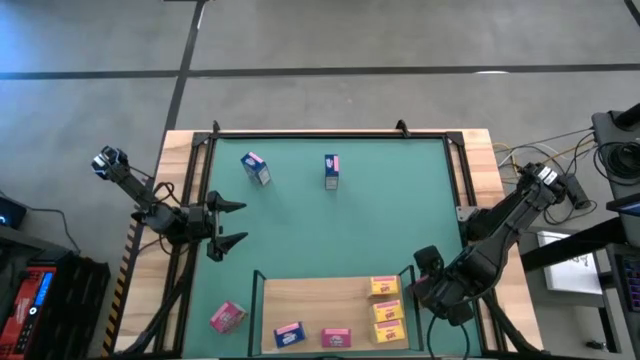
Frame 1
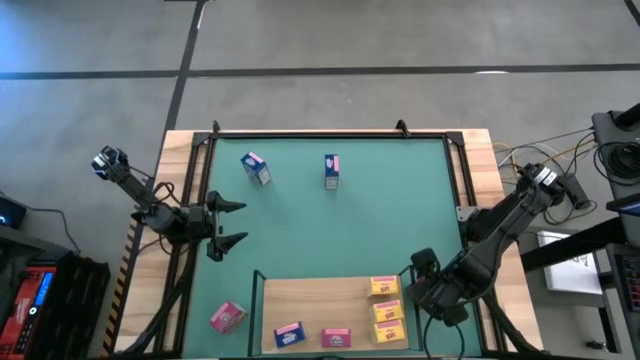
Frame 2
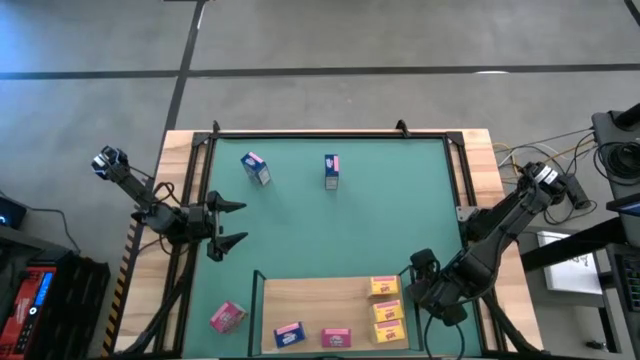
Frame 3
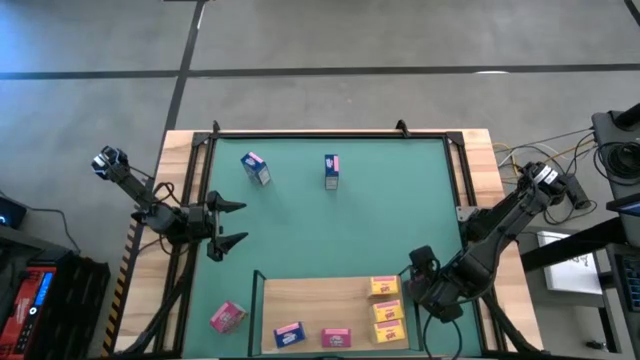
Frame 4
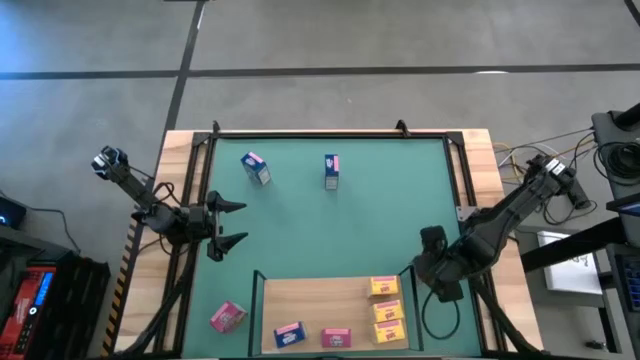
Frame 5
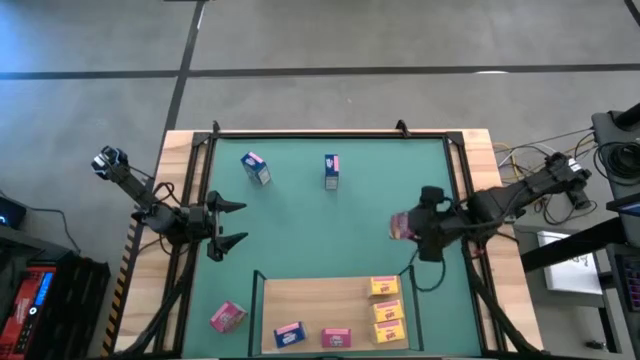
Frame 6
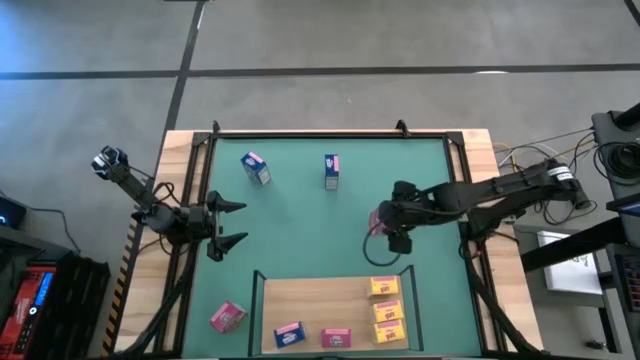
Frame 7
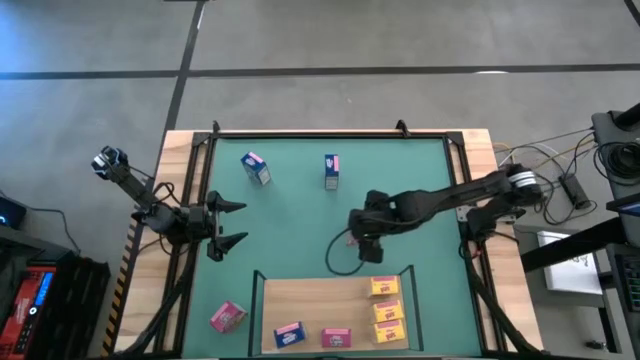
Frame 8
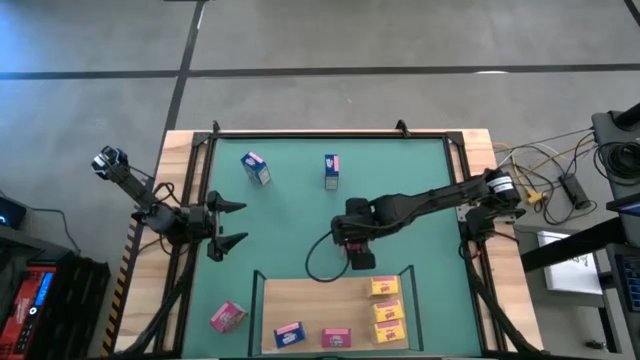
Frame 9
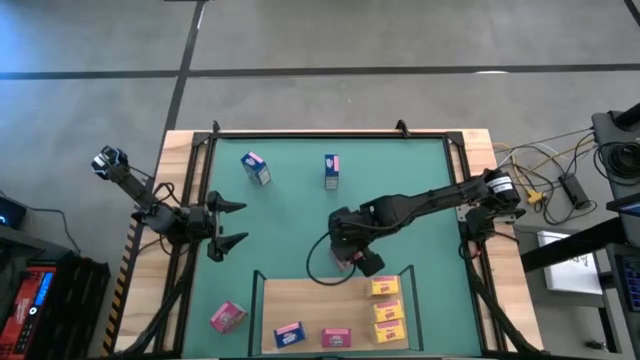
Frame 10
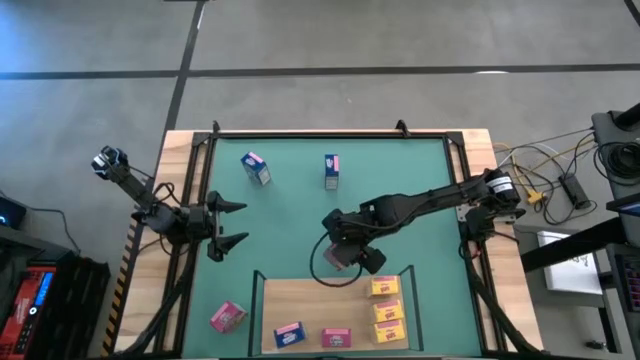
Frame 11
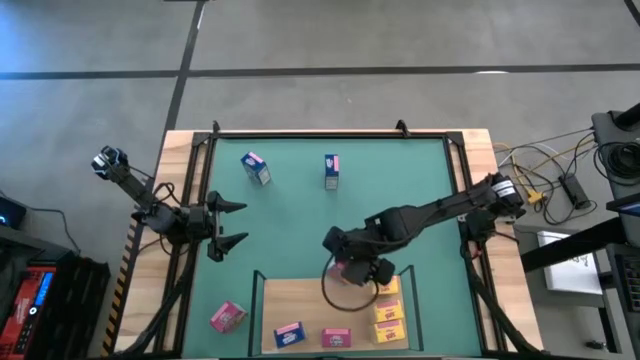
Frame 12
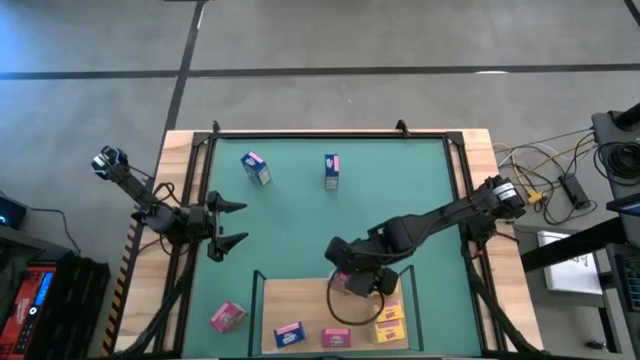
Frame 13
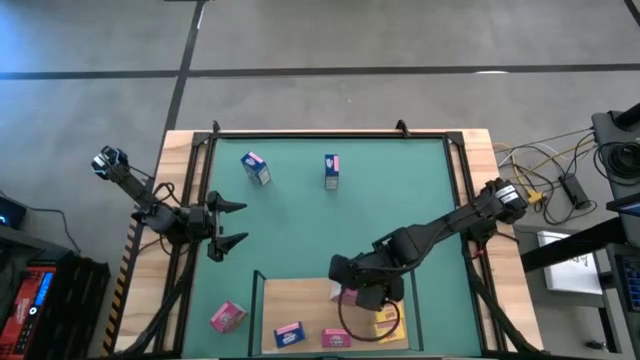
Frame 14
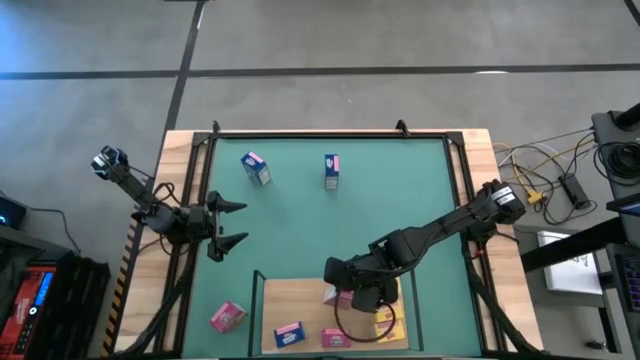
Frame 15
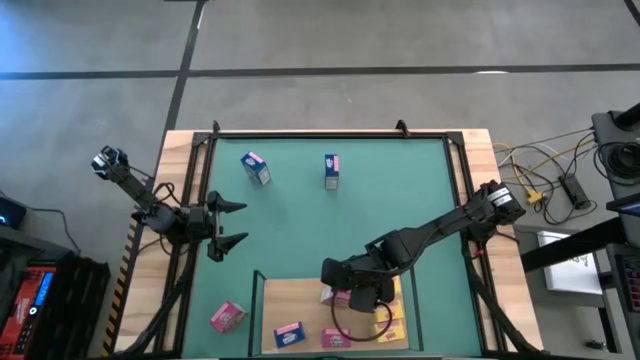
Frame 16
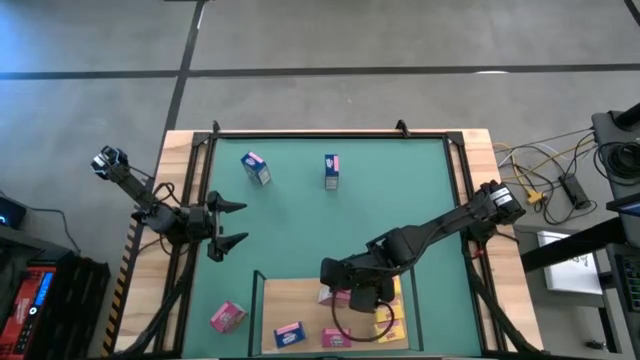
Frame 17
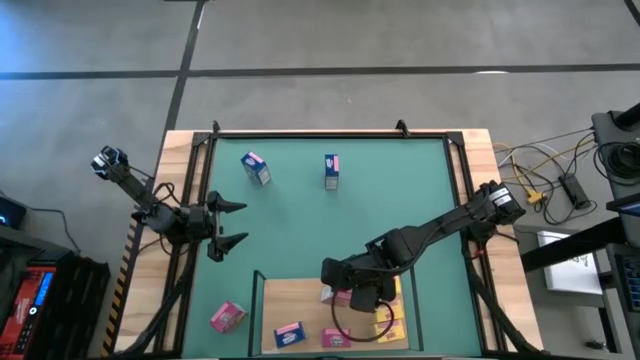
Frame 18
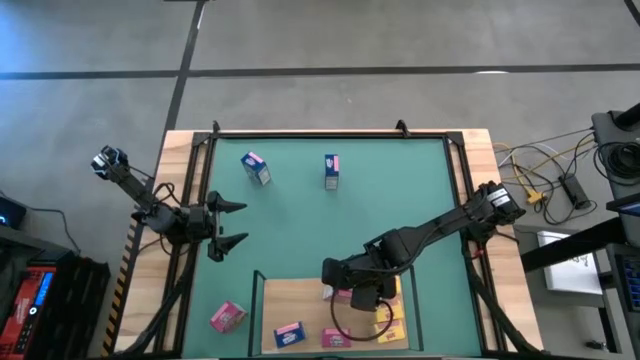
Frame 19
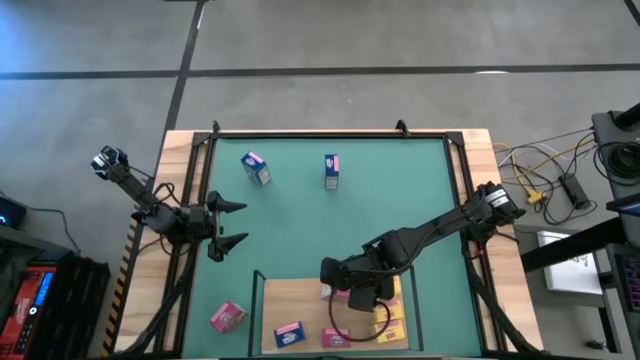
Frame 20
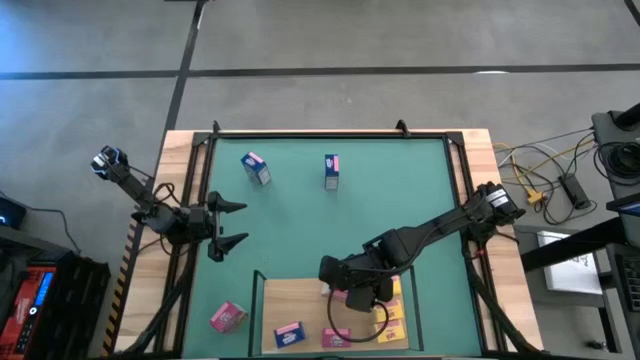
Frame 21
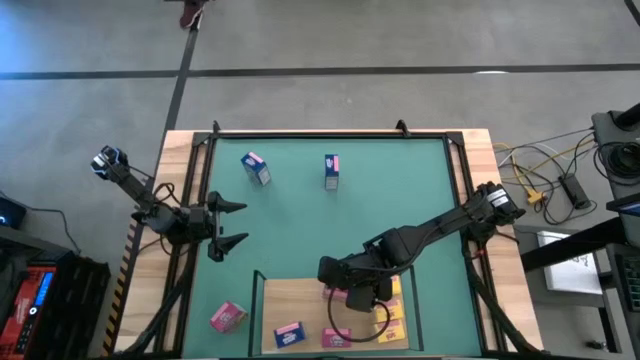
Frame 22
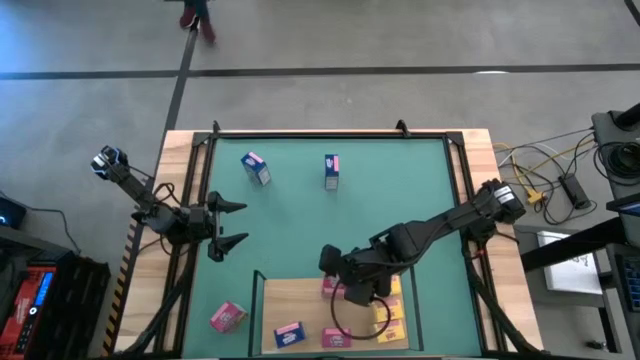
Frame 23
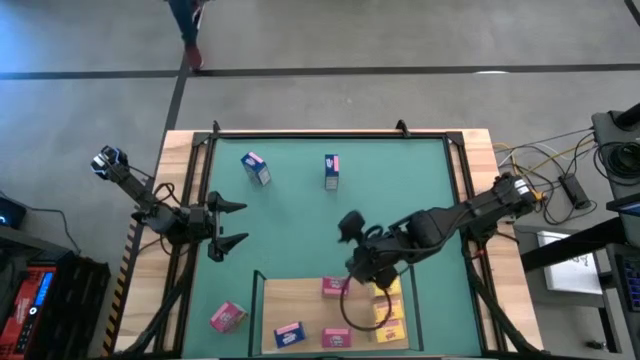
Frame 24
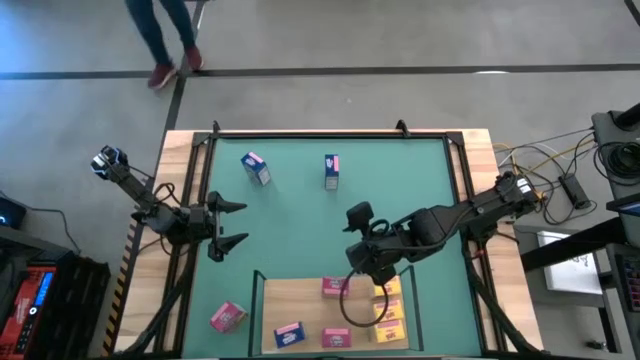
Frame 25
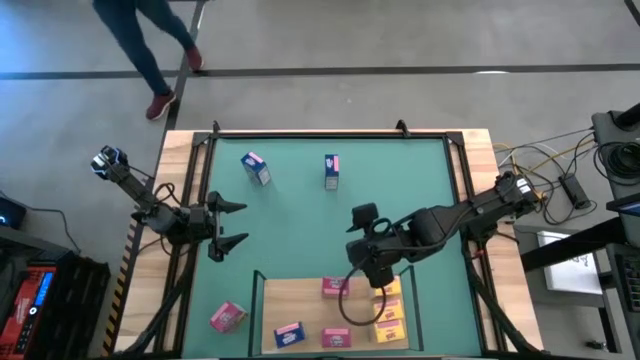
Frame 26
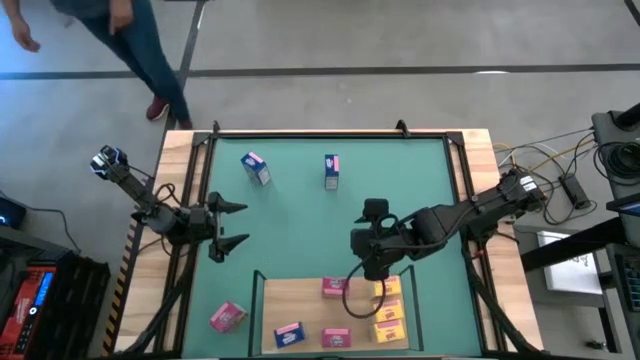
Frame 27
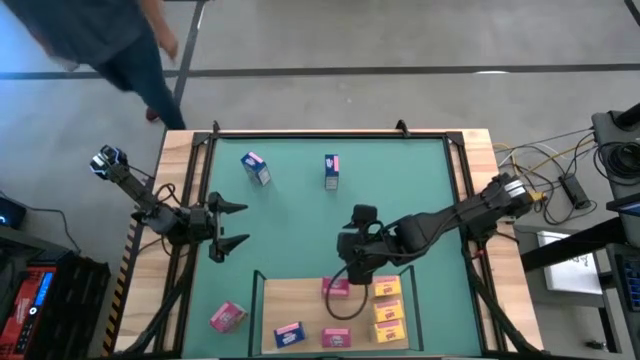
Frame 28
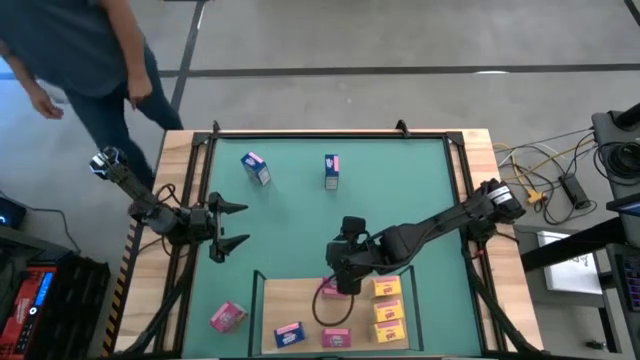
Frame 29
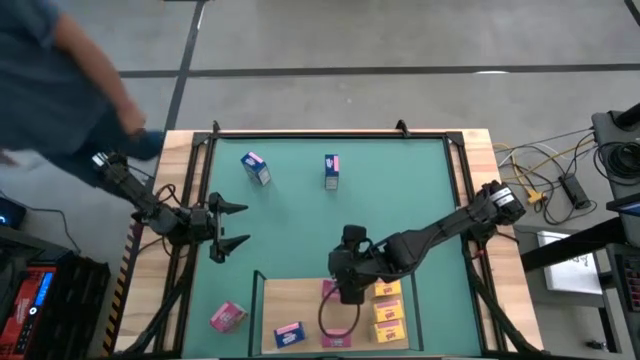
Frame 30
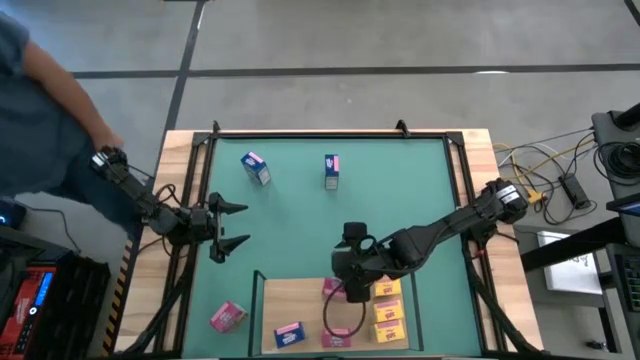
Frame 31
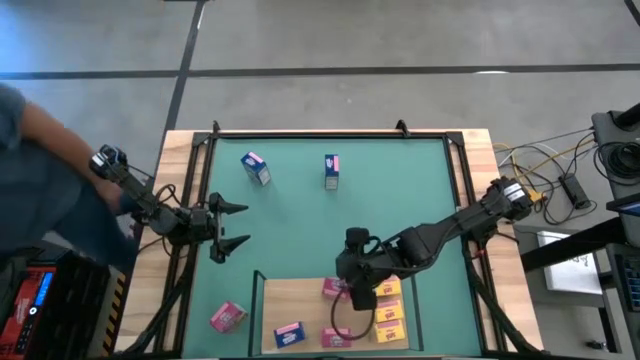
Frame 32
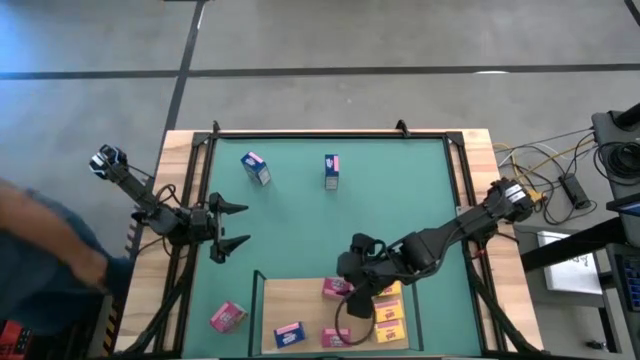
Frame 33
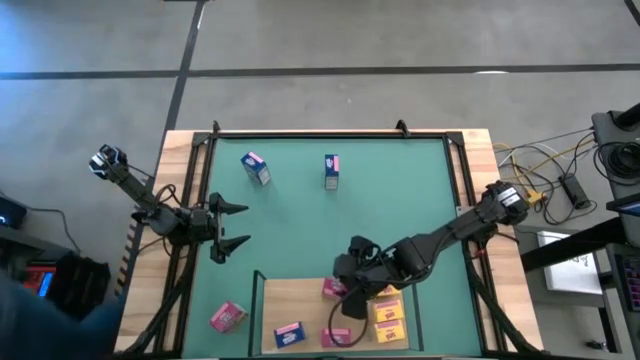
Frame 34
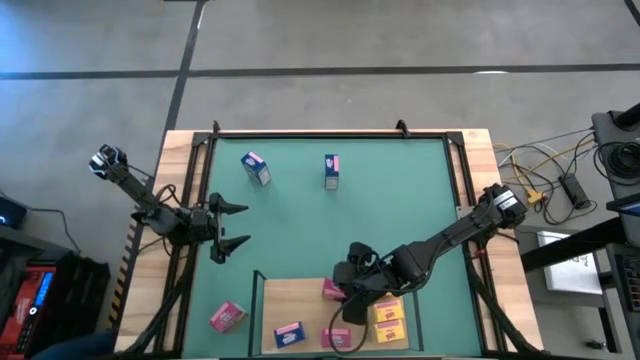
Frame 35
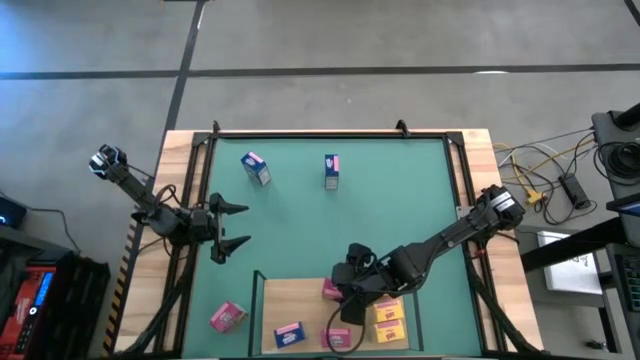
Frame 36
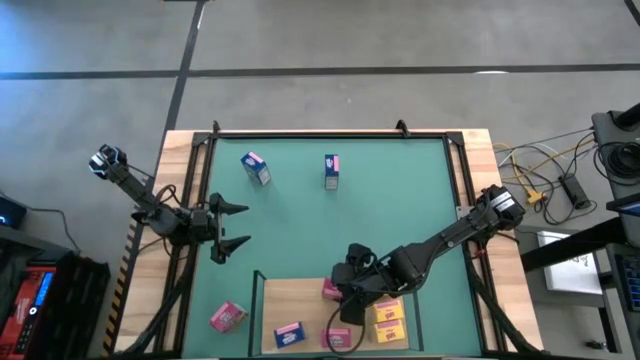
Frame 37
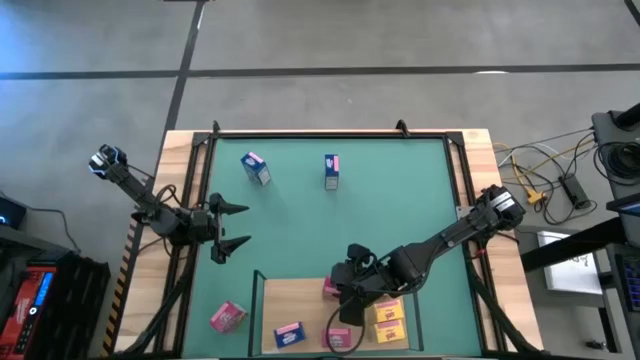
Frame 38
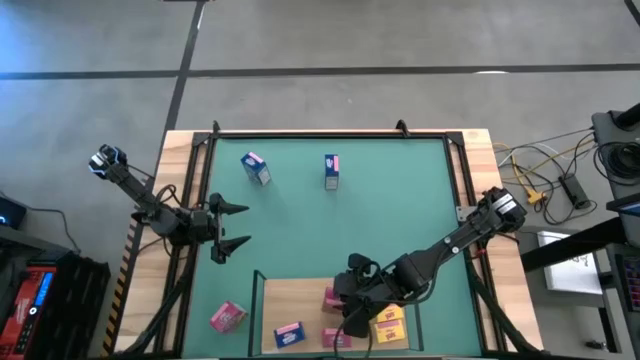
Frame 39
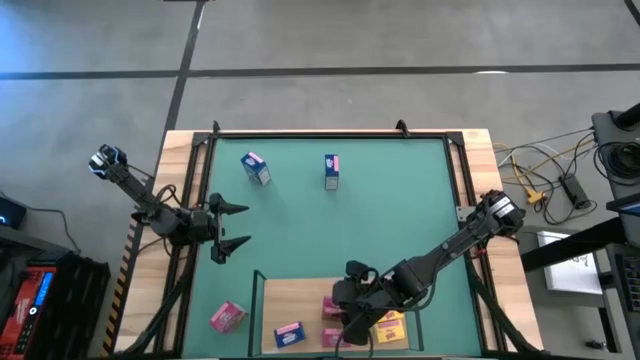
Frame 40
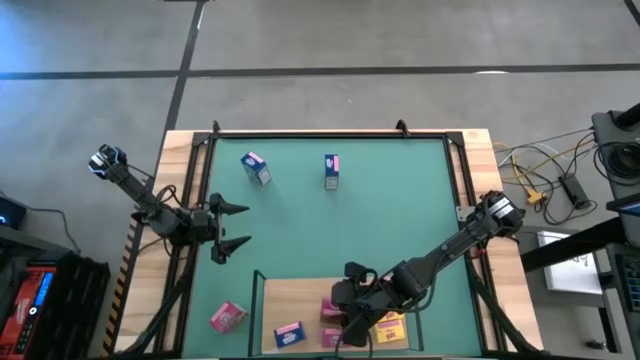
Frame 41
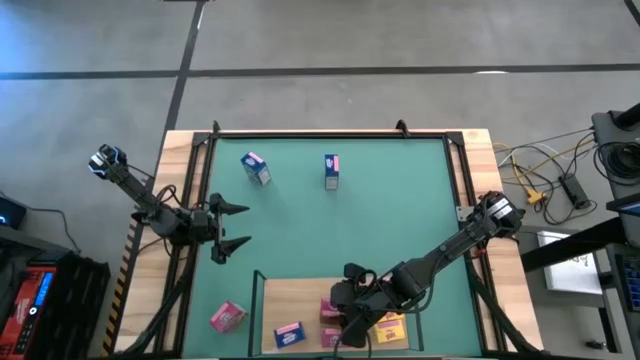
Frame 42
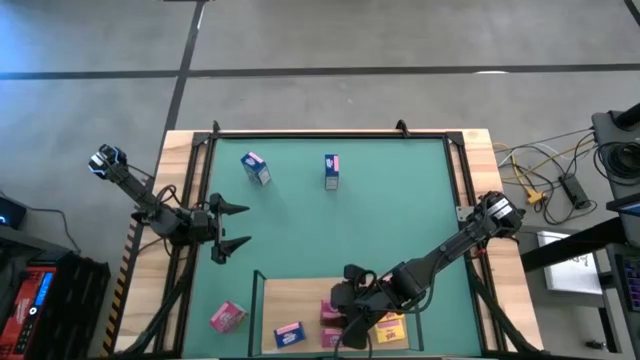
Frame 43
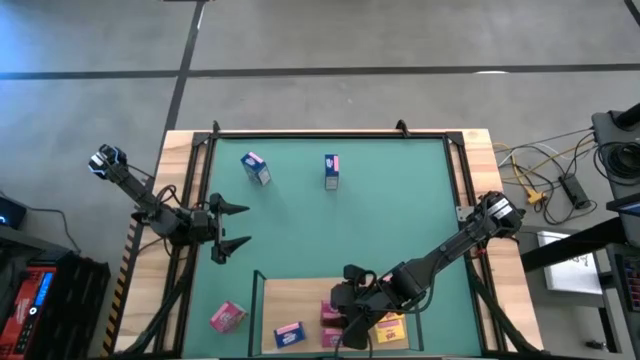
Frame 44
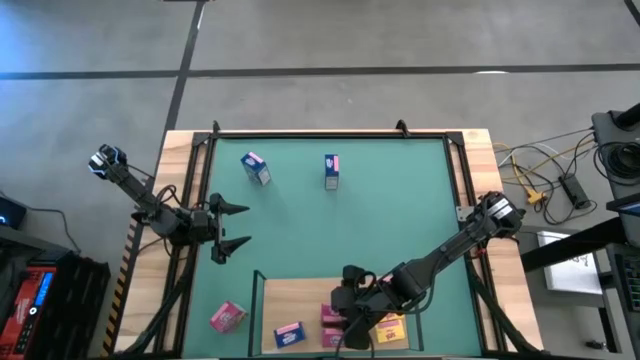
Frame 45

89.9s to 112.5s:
Task: Stack cereal on shelf
Put the right violet cereal box on the shelf aligned with the other violet cereal box
